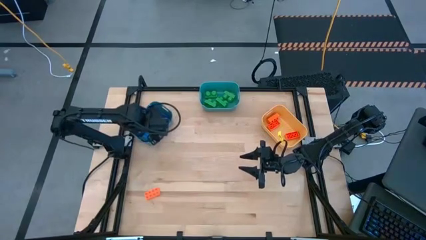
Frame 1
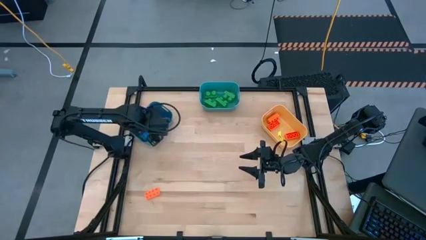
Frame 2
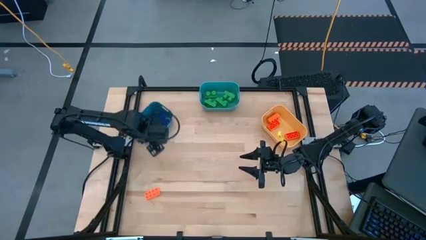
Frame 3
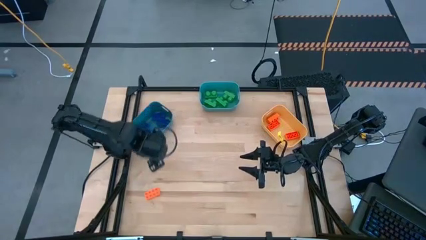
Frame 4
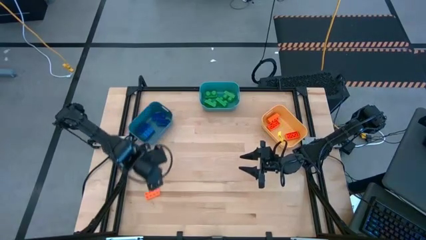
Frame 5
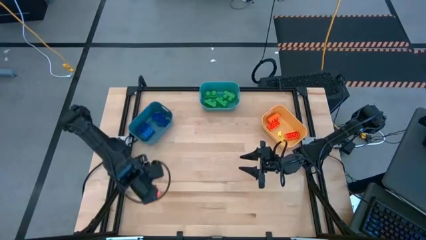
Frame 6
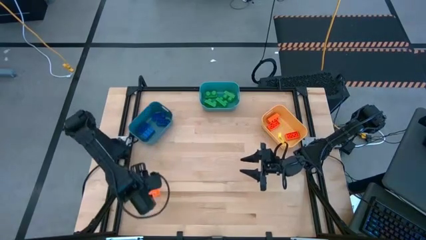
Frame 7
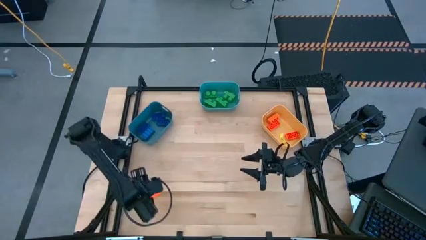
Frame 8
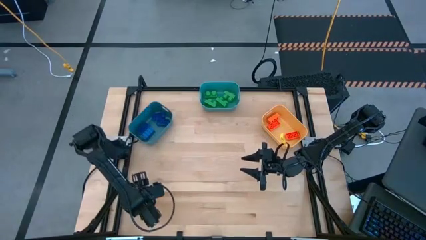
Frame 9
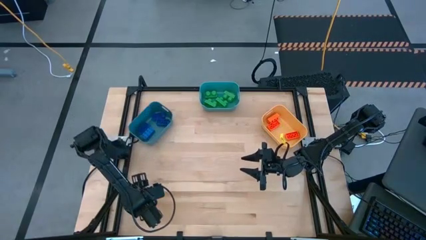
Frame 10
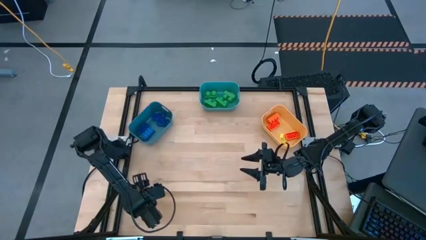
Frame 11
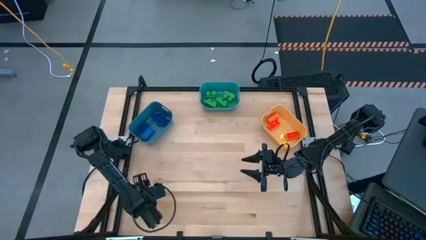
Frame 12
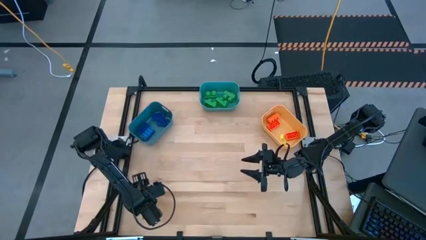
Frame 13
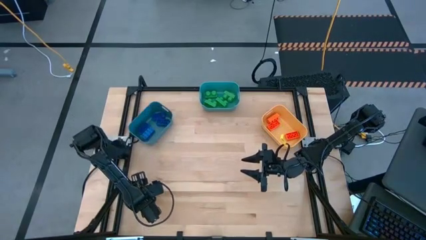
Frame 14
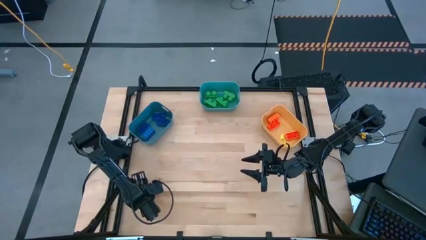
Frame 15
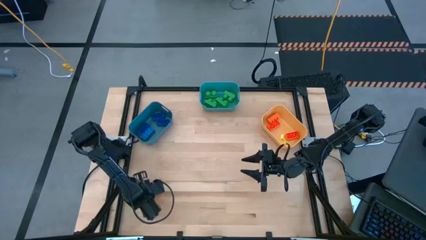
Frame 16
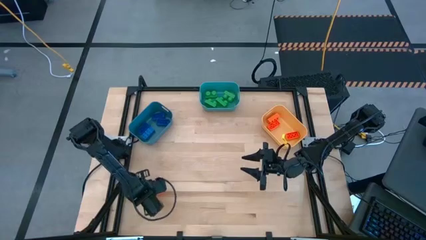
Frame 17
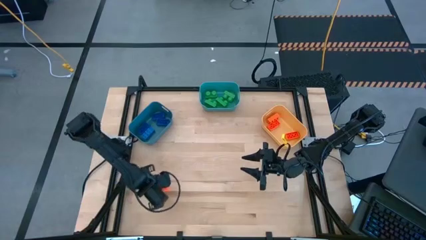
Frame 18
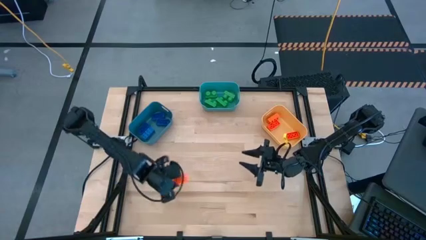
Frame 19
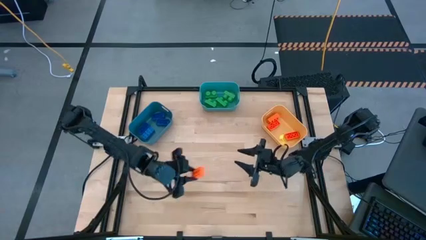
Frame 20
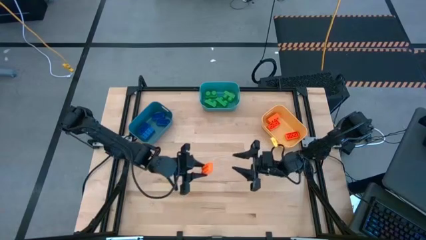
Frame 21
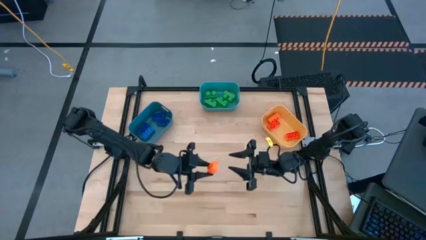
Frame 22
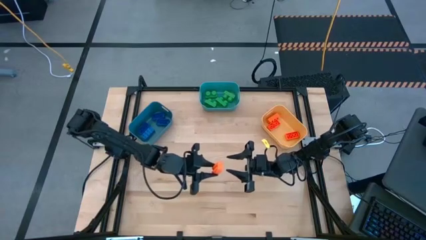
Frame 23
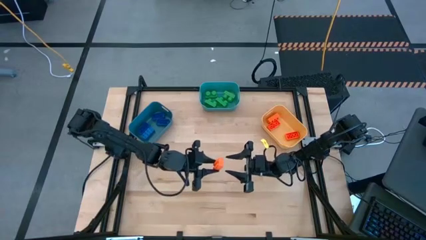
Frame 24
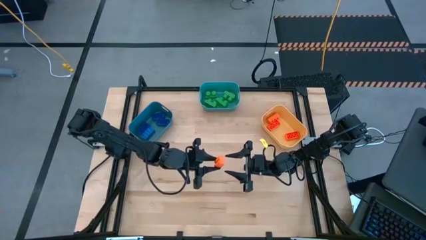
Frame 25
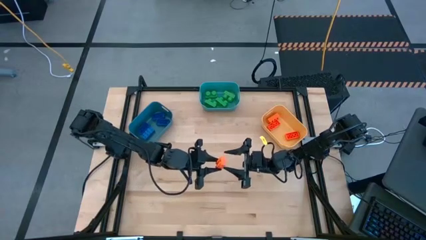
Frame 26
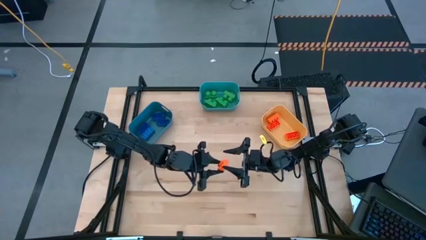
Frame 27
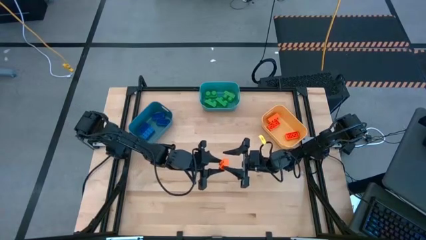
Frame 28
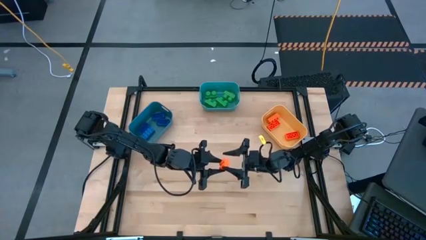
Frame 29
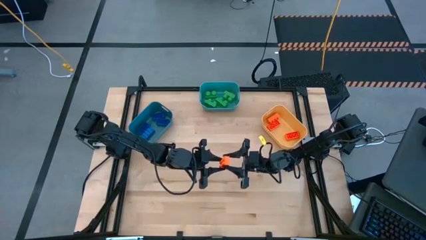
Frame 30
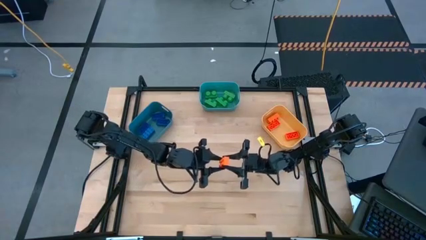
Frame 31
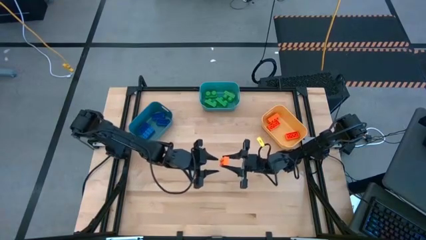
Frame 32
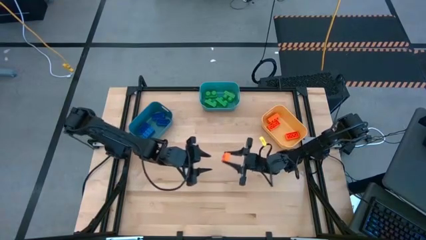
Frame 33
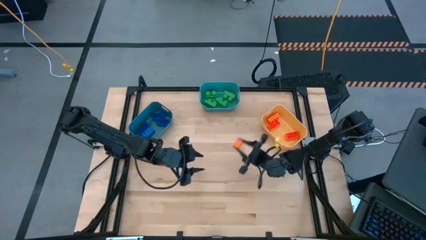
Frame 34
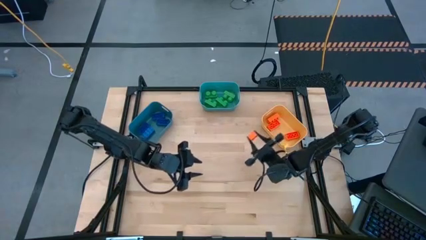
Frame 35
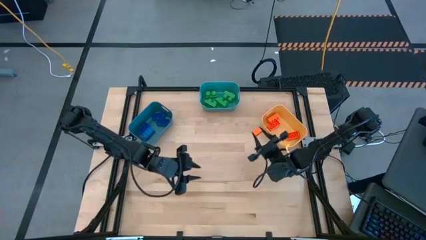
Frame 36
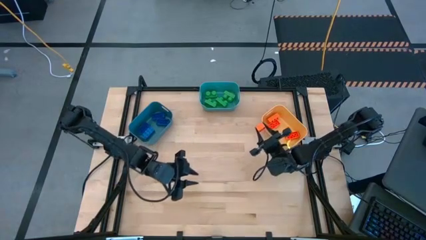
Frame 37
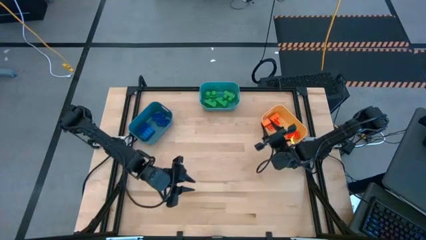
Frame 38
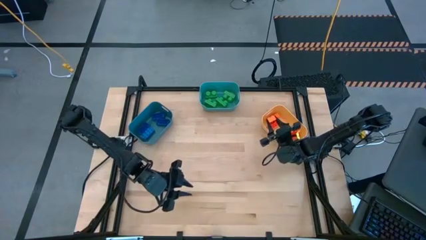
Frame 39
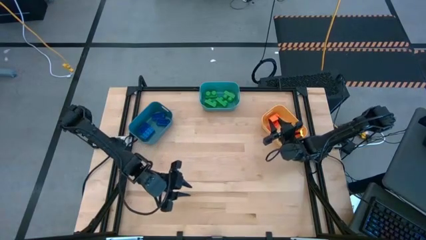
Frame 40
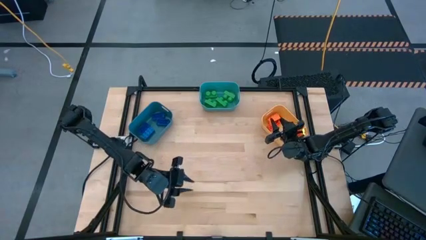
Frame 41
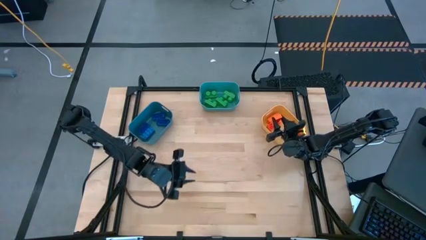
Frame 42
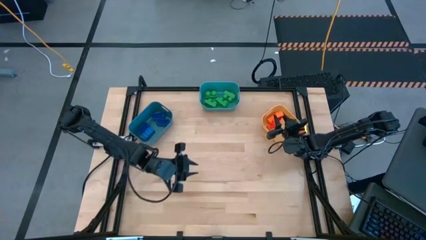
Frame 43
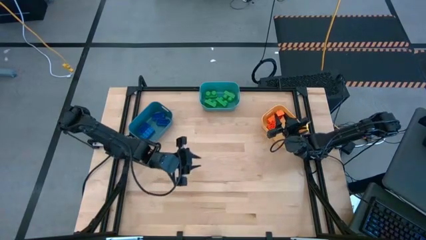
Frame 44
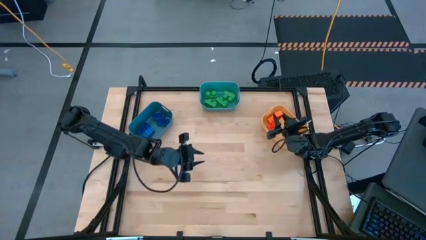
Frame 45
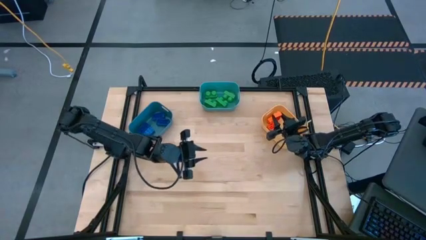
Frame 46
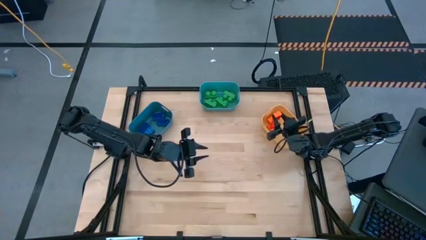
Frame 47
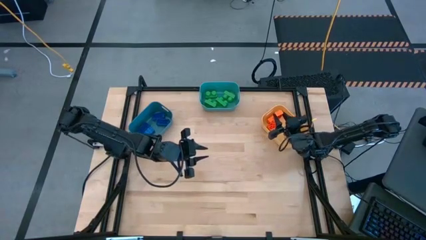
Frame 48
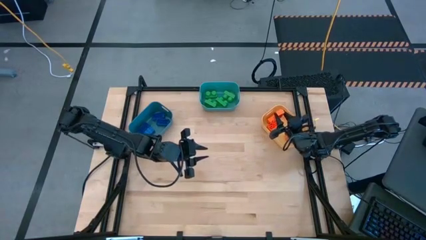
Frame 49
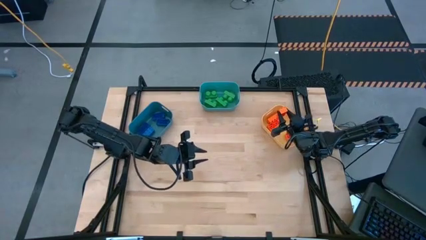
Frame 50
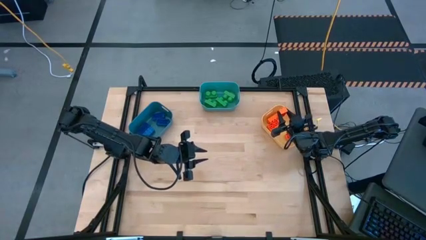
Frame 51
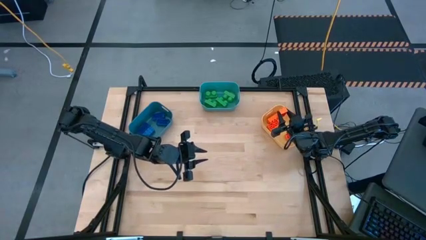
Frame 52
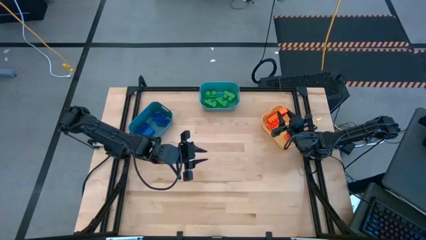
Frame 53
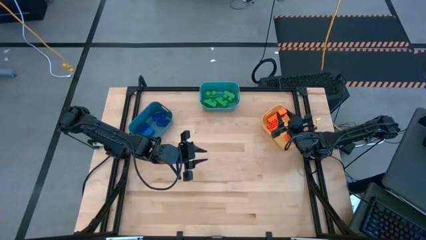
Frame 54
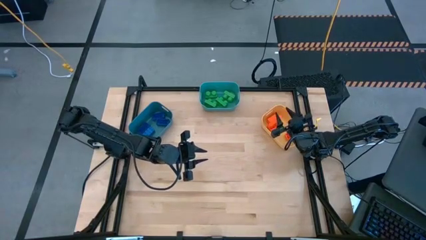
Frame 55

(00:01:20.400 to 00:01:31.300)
Task: Sort & place blocks by color
Put the orange game piece into the yellow bin

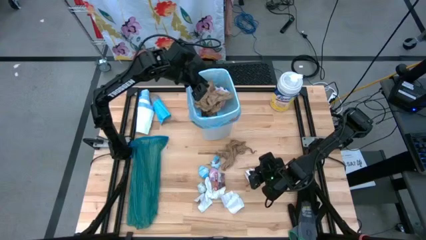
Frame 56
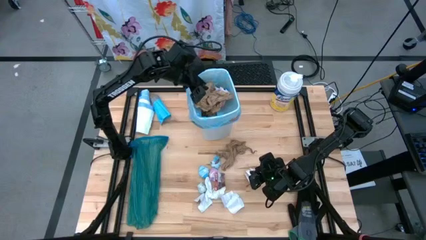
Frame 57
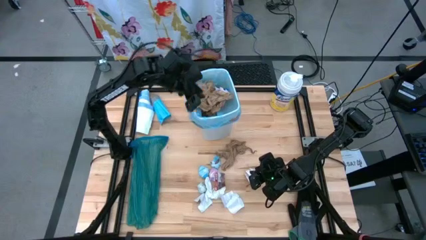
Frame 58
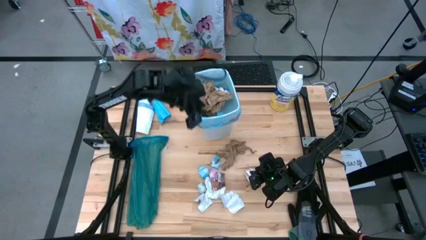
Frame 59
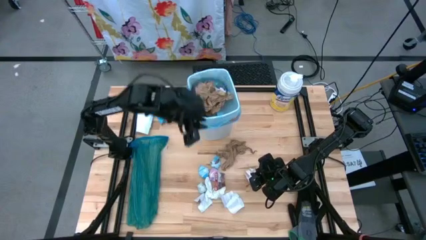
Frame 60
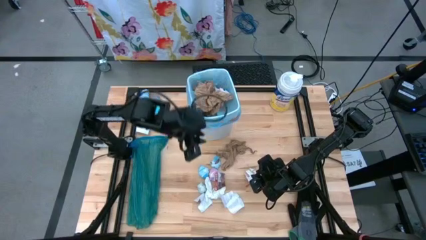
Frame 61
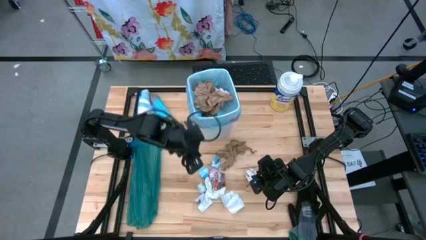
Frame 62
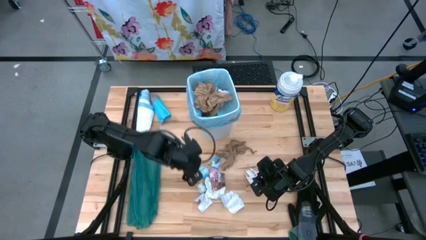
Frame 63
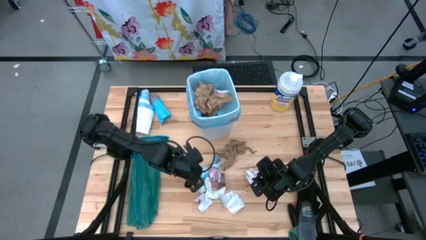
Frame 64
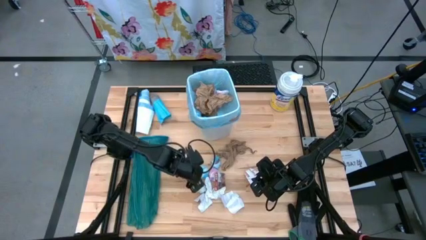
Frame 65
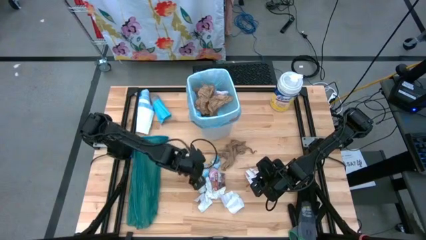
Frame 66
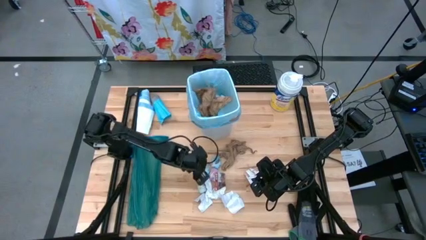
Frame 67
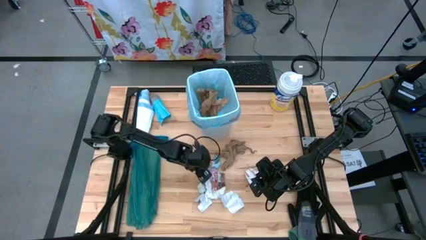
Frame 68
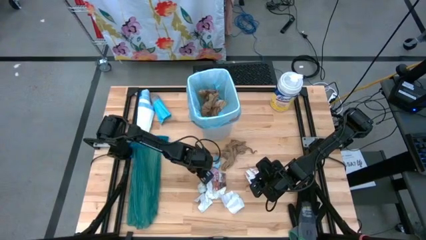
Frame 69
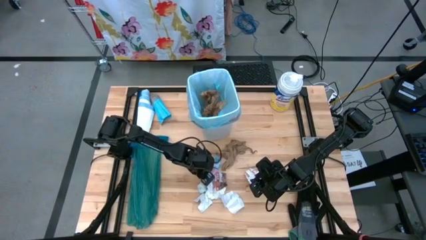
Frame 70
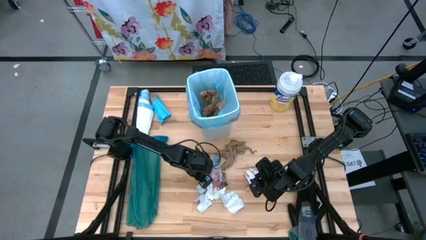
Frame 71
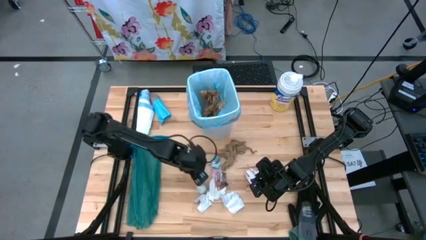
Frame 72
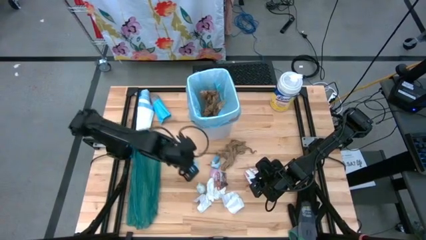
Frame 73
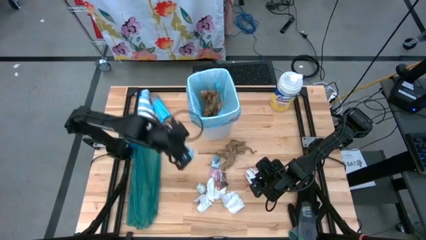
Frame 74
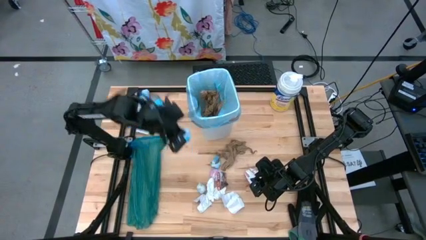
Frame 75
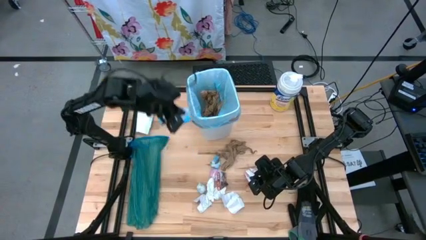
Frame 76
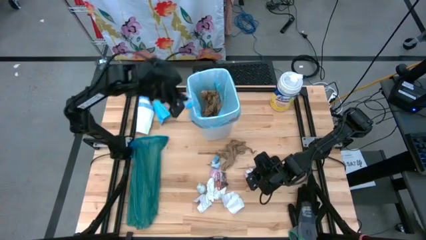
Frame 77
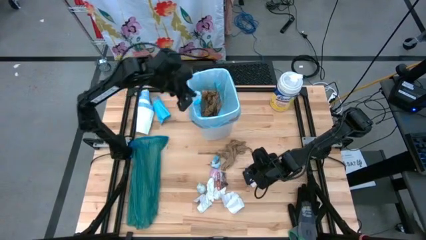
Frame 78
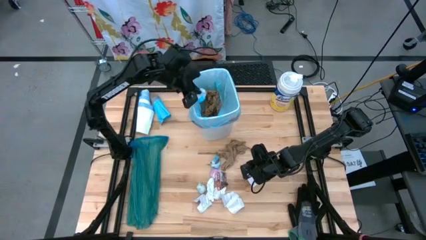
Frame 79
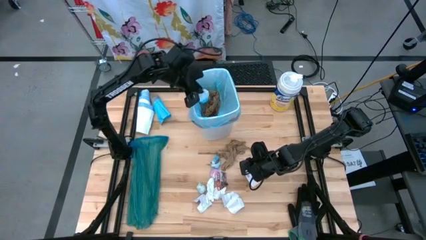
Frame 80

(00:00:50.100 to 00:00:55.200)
Task: place trash/remove bag and relplace
Put the blue plastic into the trash bin
